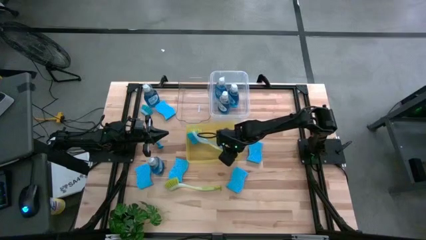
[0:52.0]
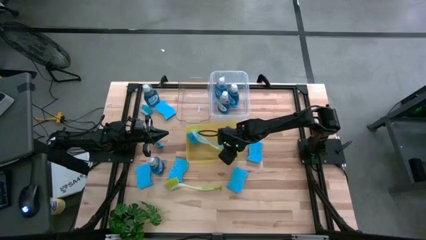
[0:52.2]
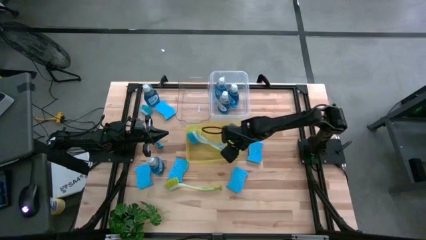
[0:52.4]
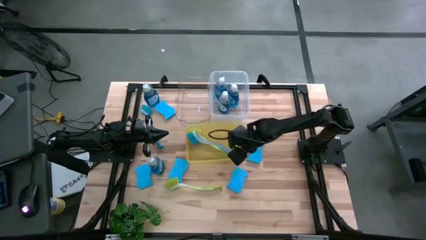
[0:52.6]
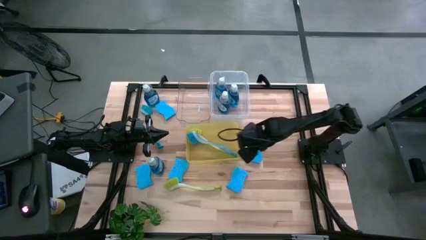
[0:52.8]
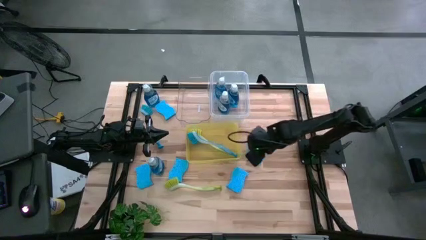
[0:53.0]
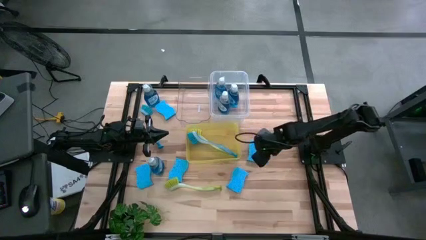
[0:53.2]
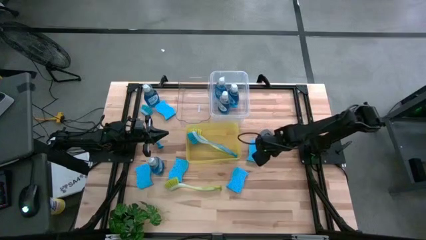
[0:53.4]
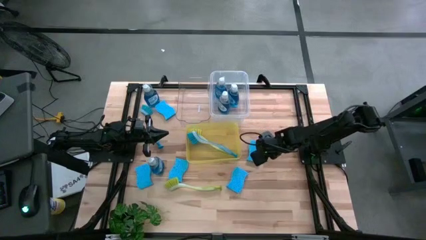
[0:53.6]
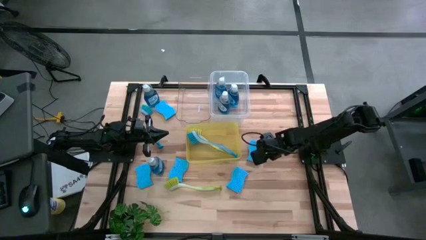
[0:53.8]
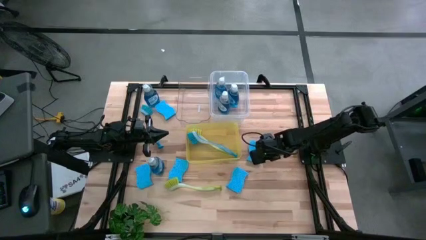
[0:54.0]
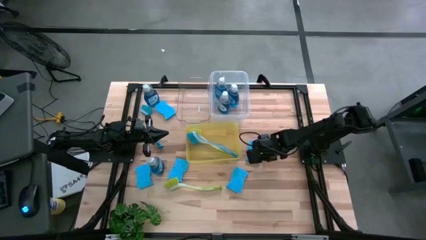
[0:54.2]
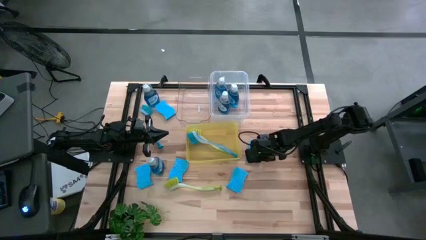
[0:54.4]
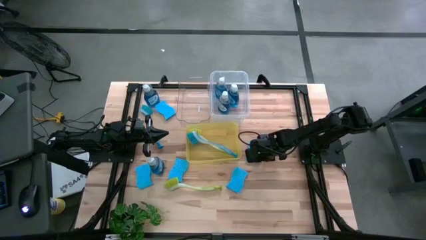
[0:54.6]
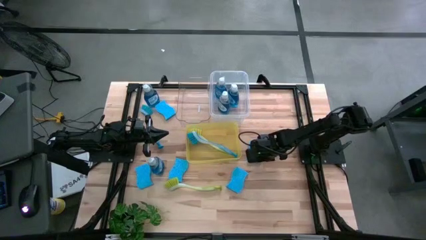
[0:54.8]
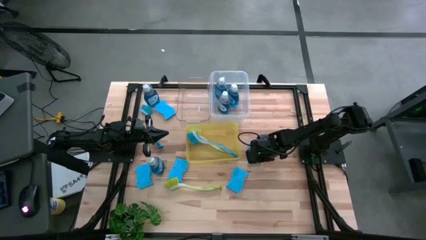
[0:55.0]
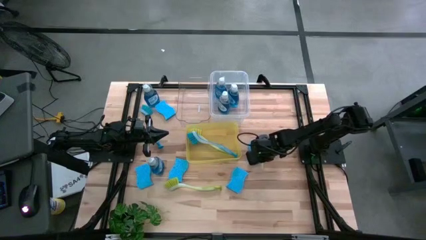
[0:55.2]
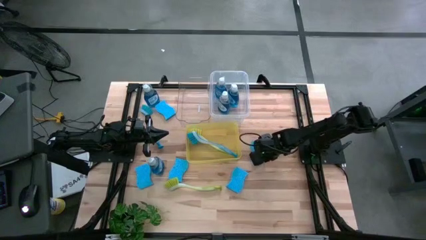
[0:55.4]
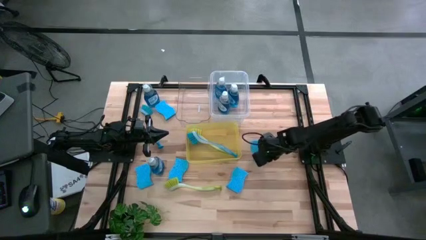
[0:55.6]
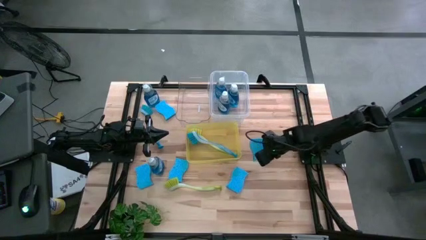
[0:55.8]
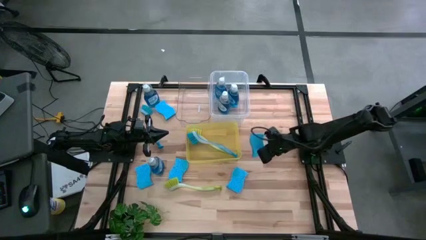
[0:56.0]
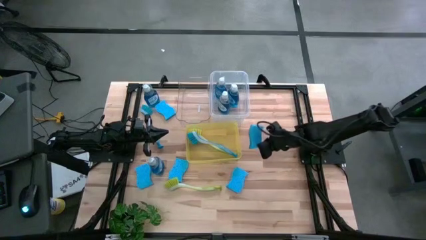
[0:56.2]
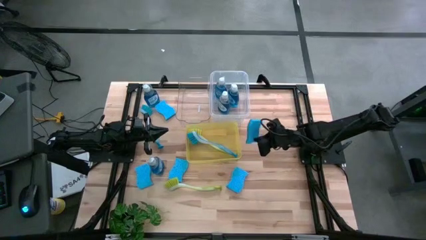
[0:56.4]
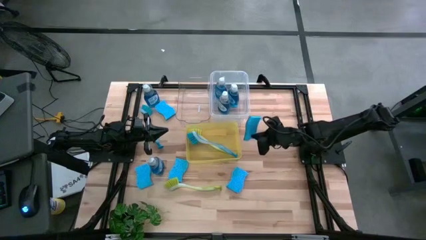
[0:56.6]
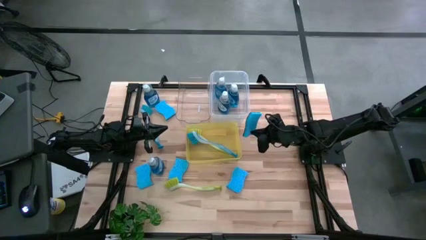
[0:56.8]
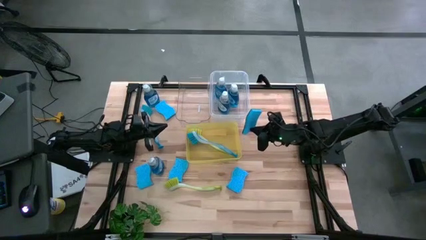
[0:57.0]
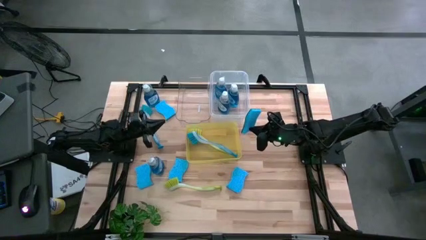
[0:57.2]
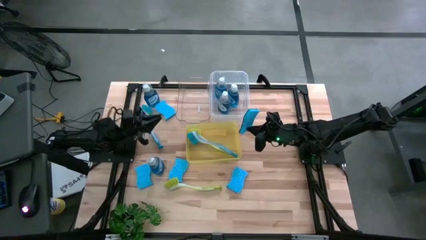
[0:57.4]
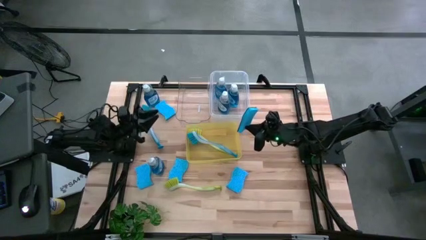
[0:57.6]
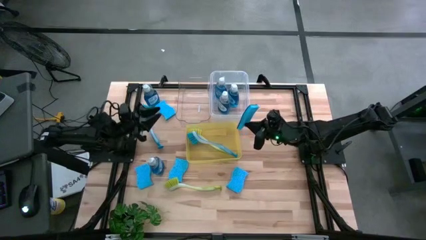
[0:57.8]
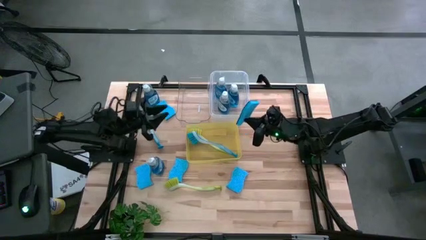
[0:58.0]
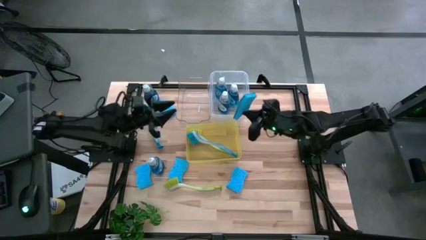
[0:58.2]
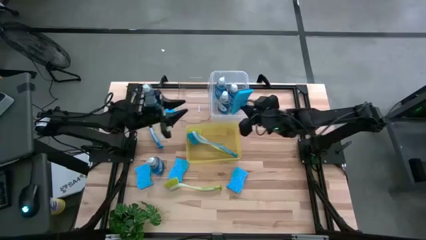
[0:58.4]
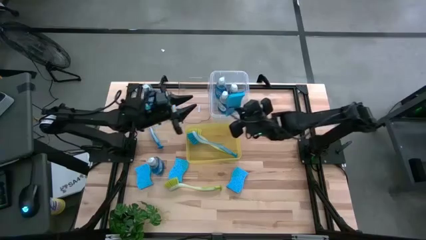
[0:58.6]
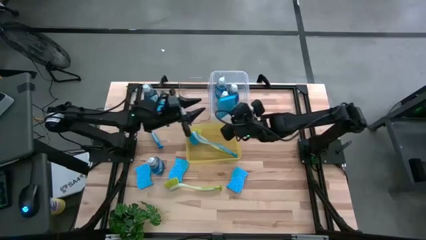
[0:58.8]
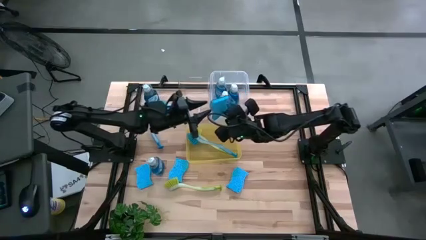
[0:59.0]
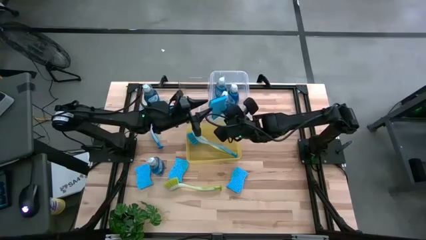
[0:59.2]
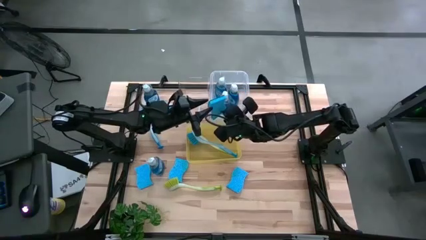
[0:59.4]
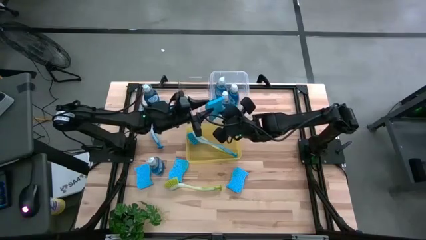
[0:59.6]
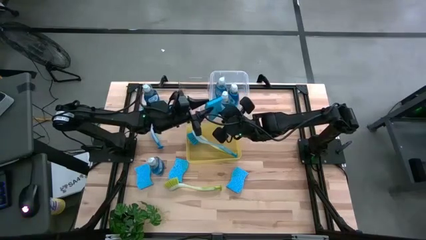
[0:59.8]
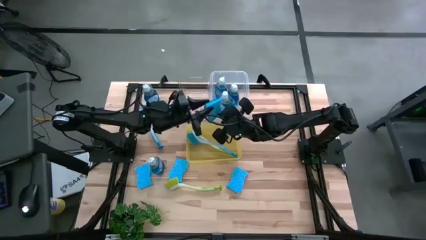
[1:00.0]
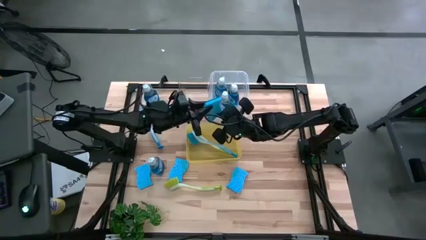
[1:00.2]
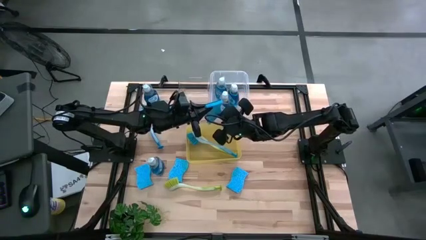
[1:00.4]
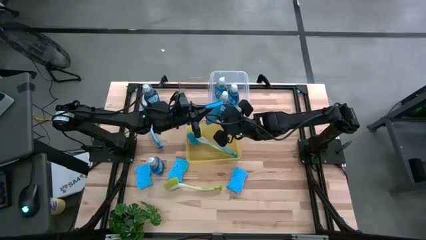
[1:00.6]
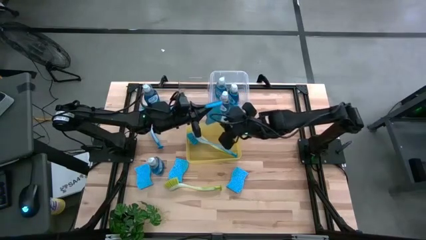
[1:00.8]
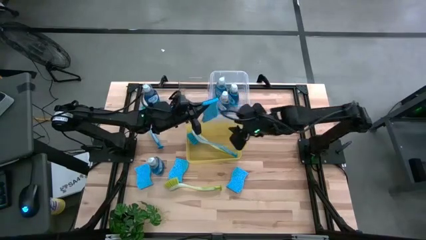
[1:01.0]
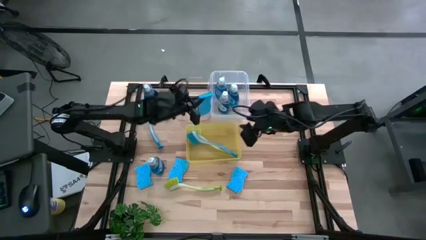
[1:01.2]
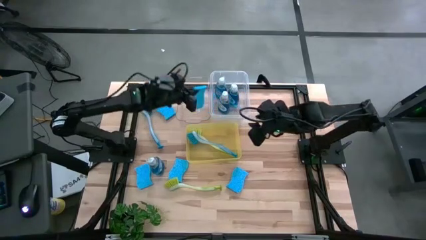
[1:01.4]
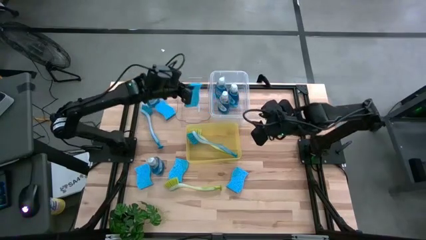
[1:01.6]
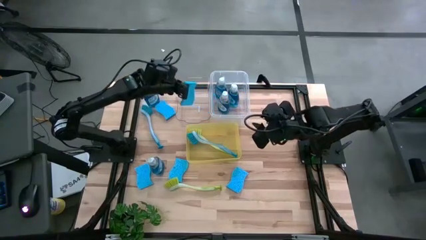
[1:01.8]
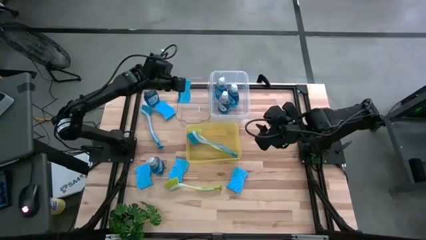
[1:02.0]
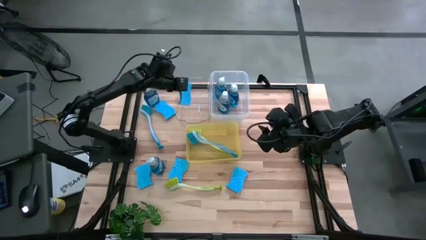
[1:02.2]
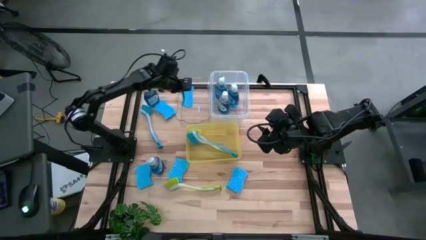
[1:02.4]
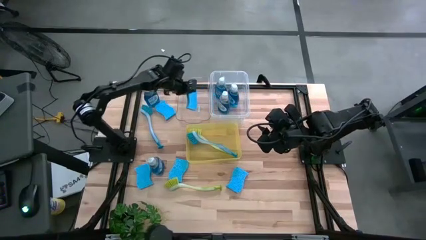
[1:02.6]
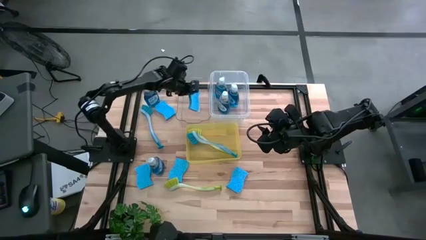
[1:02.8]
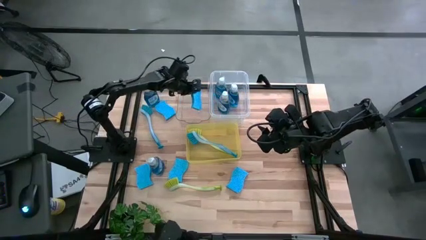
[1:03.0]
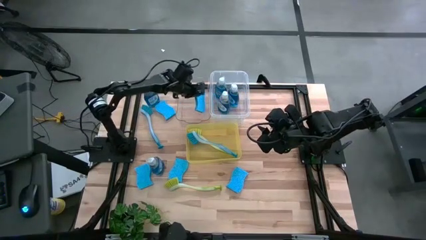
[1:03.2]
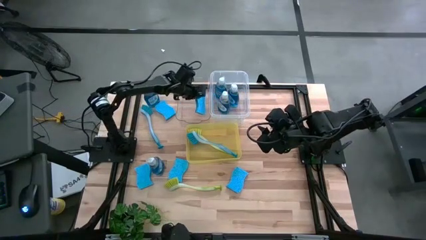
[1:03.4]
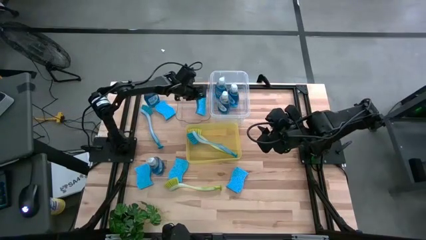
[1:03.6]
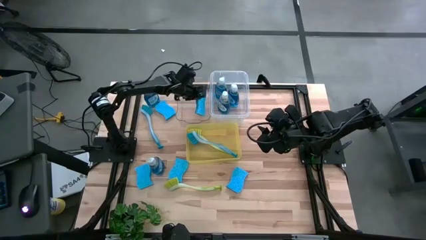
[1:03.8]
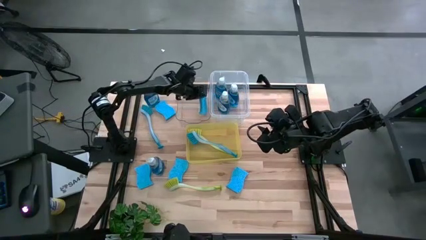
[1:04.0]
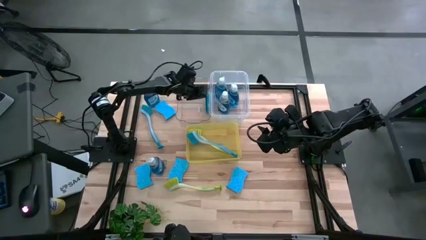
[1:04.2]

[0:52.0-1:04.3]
Task: Pick & Place Kitchen Sink Supplies
Put the blue sponge into the transparent bin

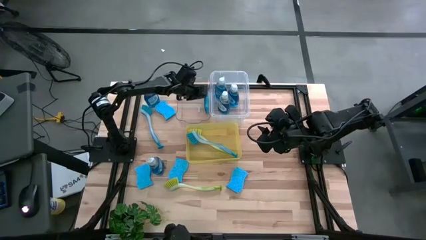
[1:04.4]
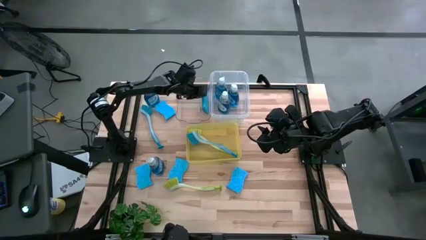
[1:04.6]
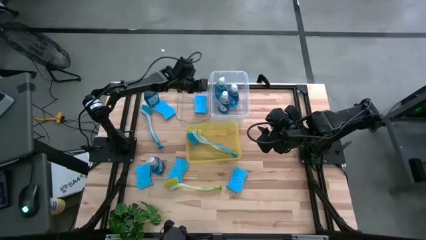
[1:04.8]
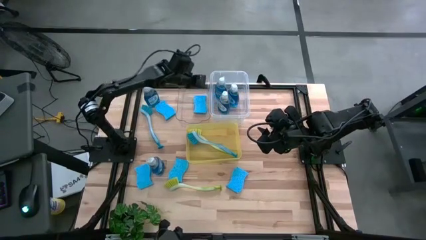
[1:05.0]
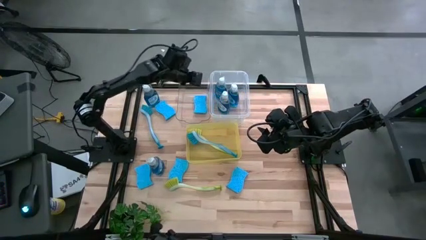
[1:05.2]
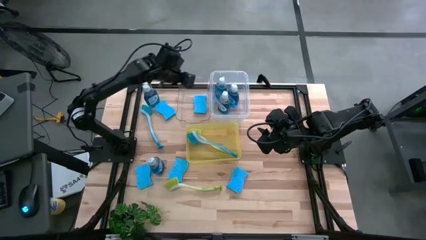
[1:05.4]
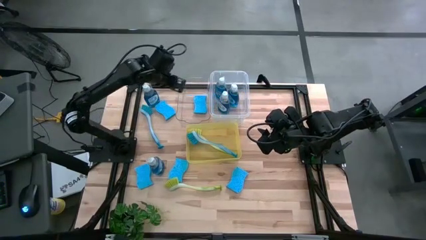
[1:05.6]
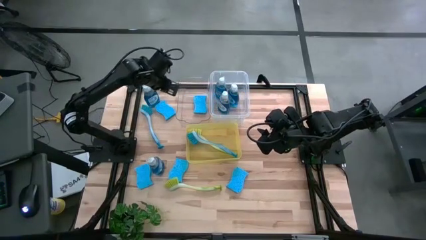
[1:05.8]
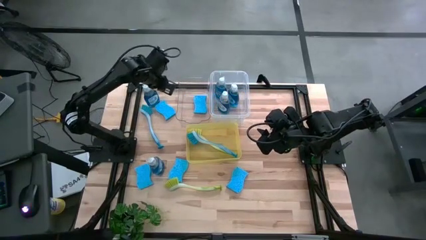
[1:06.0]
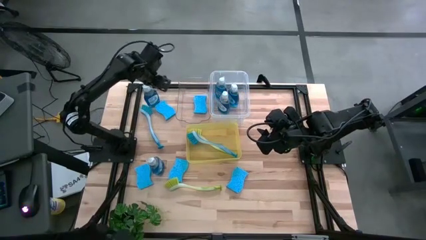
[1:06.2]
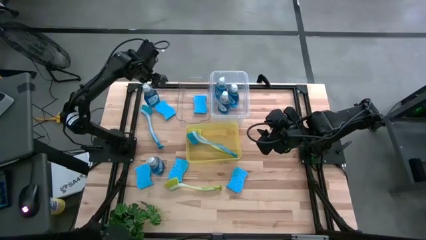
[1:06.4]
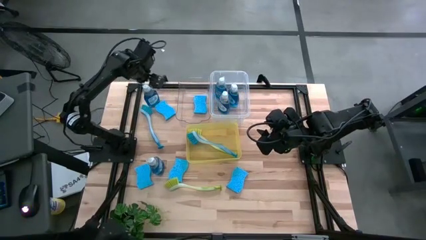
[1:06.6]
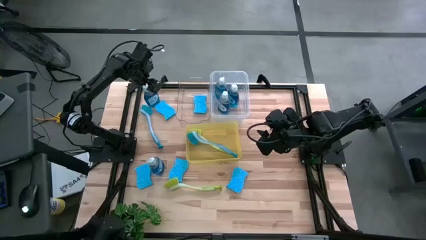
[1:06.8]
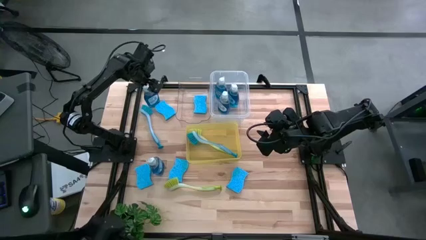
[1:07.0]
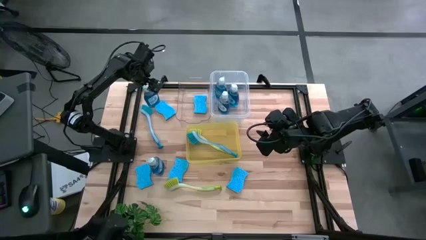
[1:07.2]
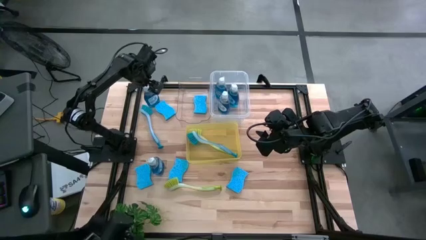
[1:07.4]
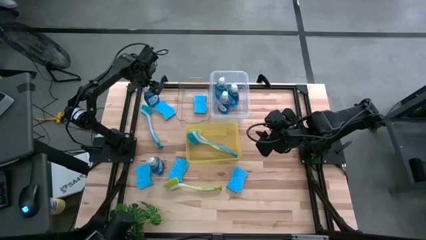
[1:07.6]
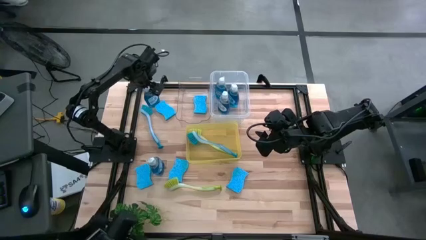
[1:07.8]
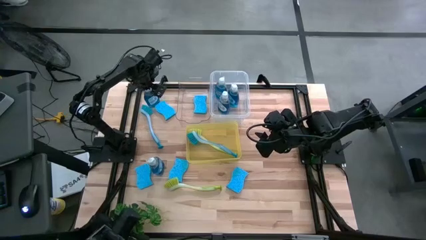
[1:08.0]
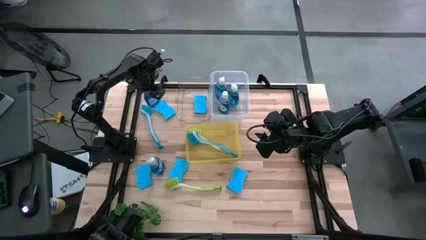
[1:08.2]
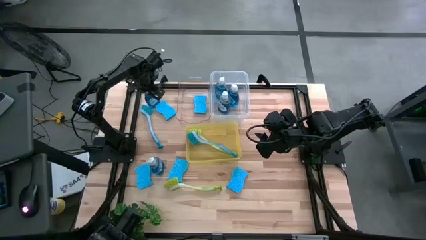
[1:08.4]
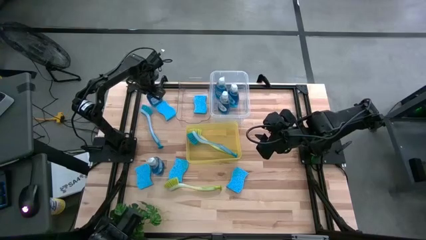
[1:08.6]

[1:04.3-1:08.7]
Put the blue dishwasher liquid into the white bin
